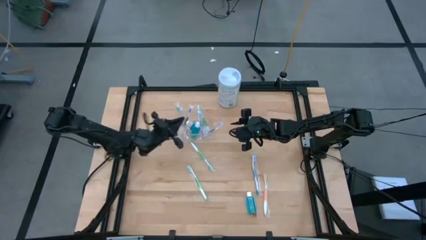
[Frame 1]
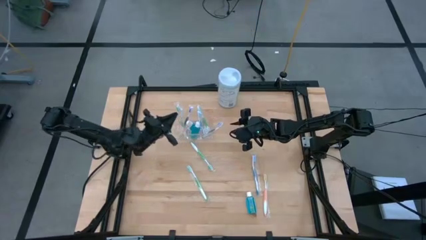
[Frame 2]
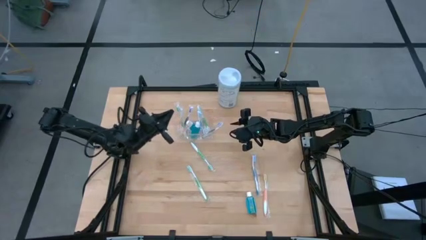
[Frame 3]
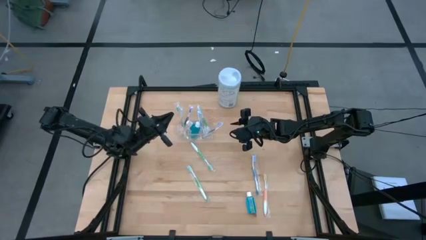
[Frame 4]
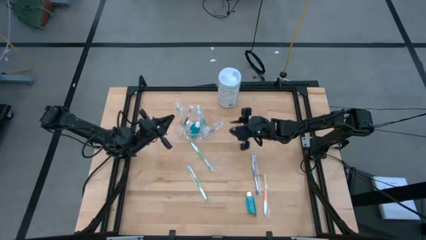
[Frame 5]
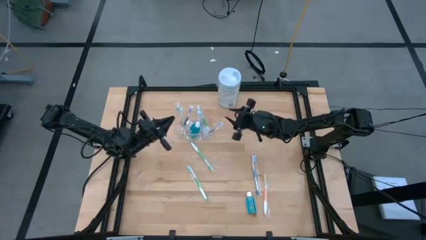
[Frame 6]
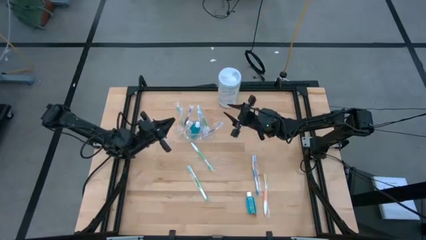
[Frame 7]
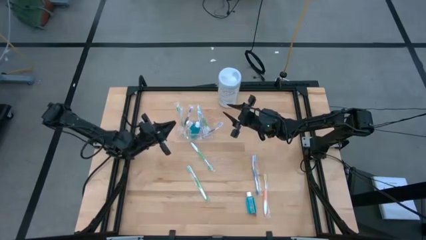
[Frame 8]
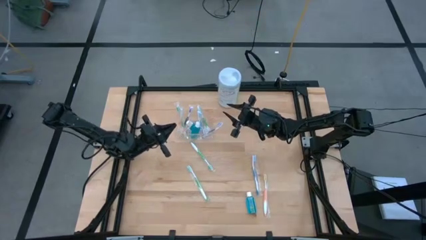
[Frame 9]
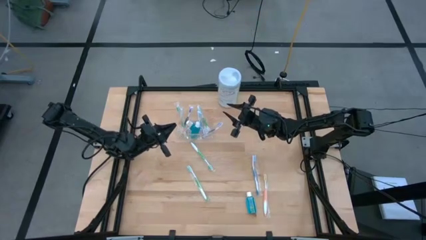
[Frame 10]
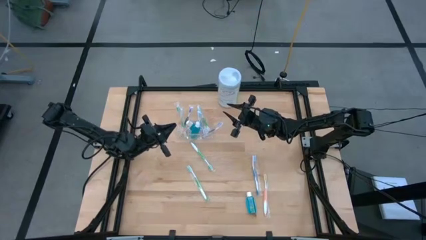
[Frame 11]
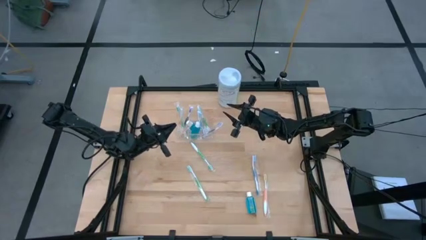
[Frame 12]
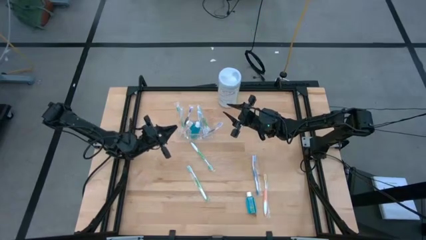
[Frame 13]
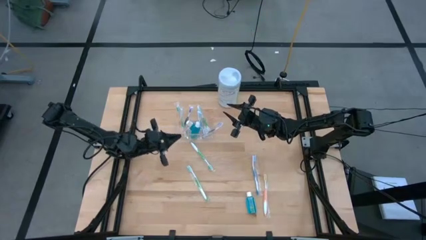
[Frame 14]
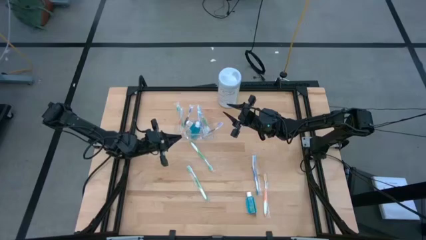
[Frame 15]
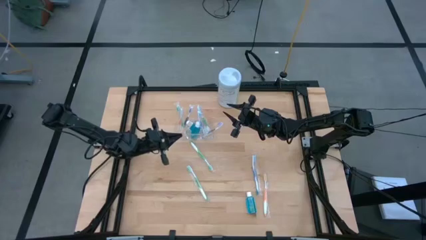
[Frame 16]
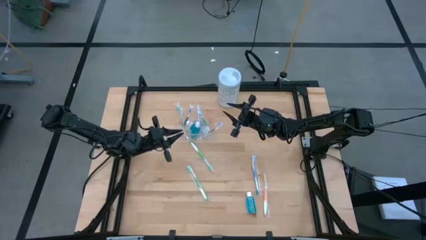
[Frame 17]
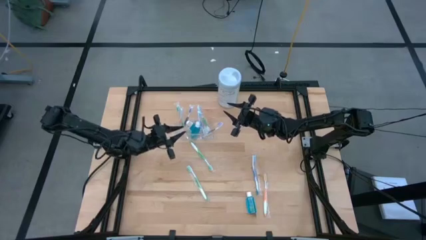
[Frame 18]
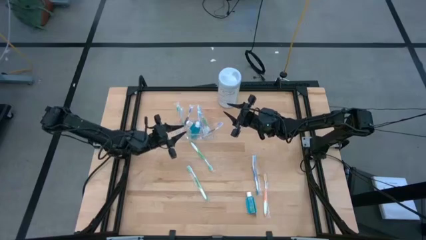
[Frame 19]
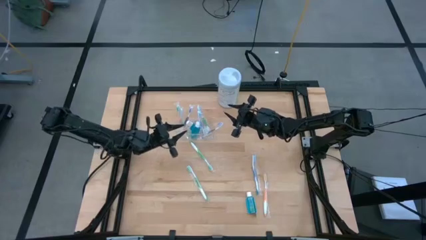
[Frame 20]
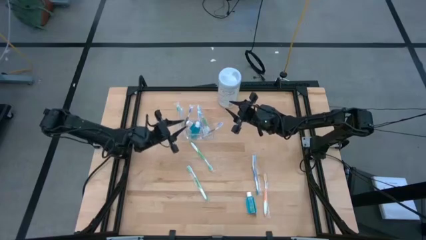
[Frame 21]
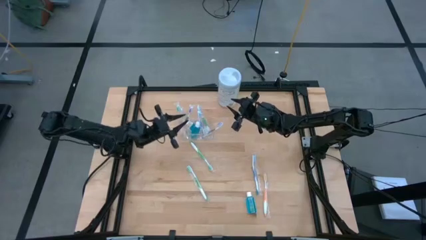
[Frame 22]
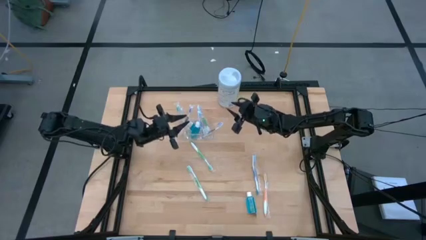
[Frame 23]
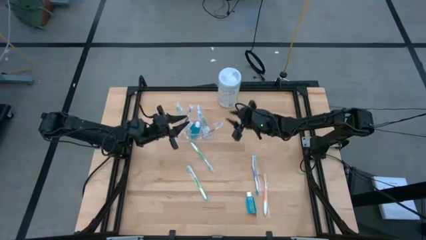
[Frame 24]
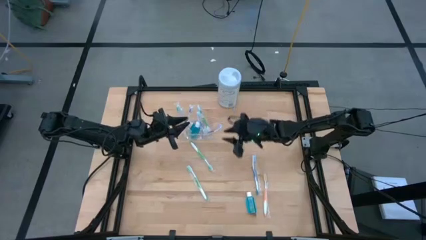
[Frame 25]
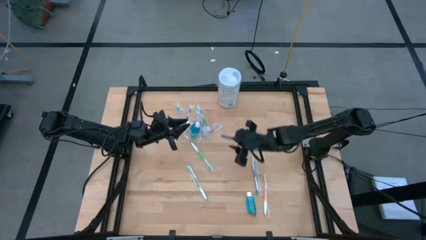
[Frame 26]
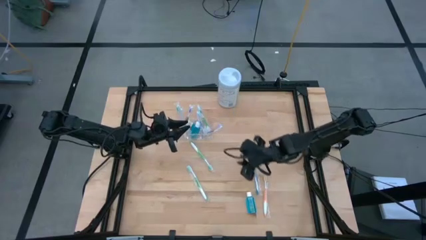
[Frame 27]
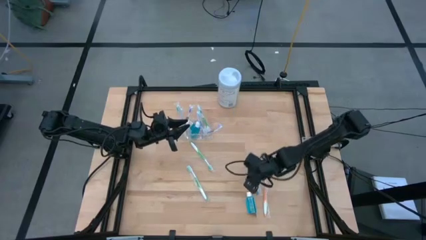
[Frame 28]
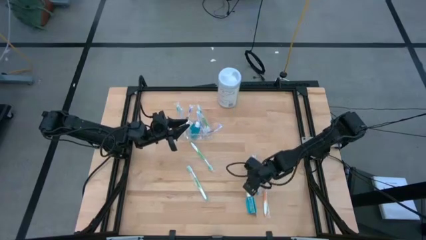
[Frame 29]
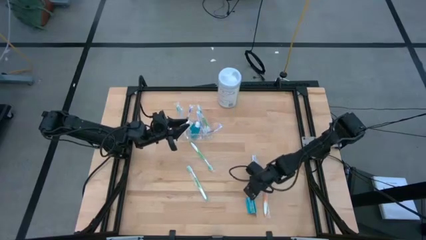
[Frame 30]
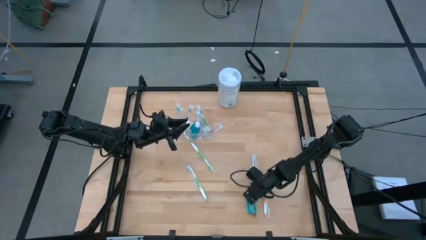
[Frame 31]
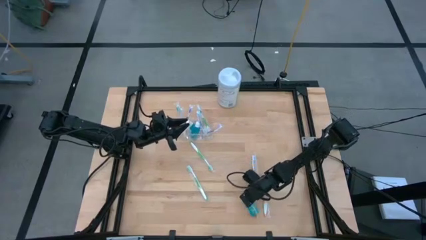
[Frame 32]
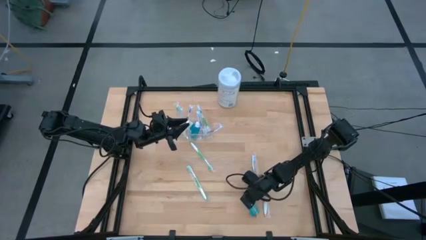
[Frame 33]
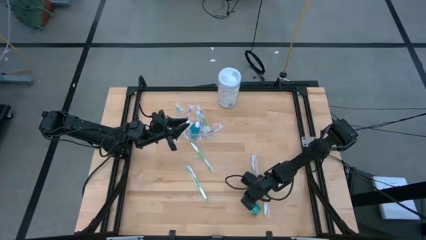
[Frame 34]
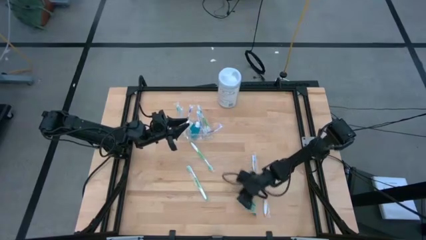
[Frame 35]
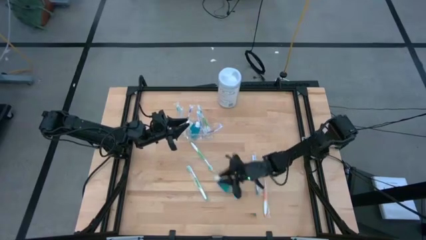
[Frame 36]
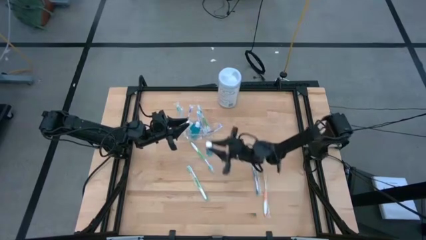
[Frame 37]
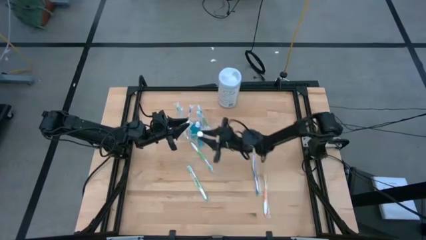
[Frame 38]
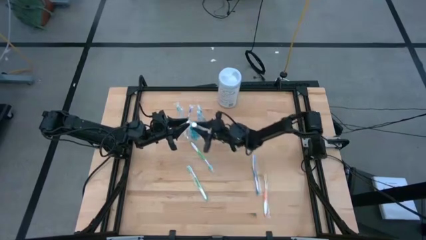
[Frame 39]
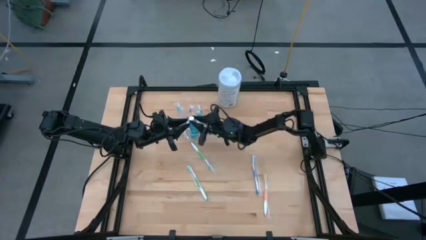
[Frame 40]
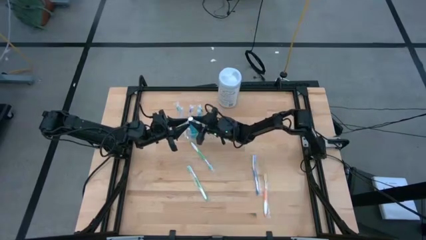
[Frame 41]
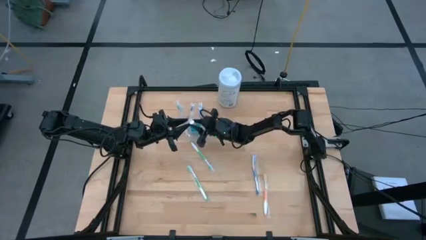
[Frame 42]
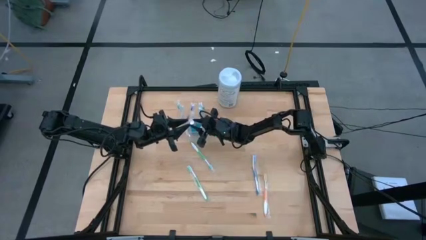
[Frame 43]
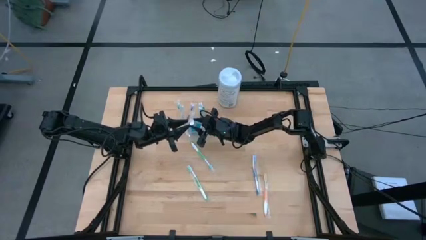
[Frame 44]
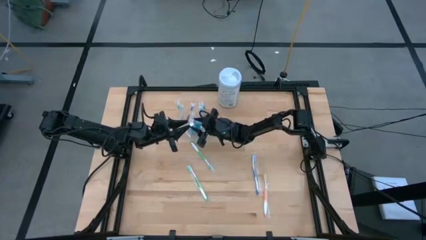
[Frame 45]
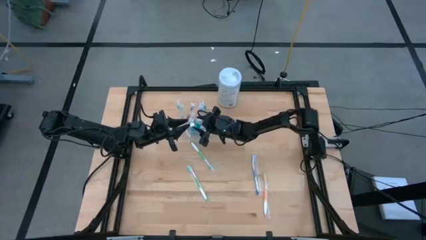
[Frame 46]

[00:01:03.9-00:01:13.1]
Task: Pick & Place toothbrushing station
Put the blue mouthwash into the transparent organizer

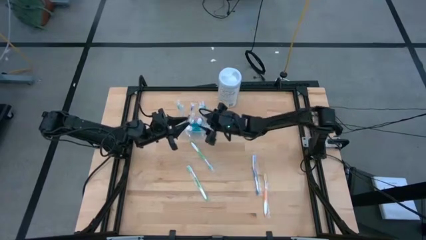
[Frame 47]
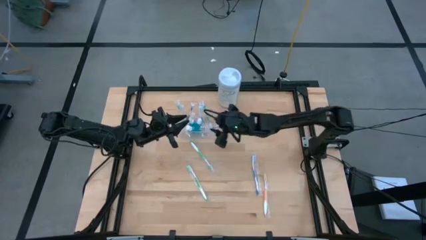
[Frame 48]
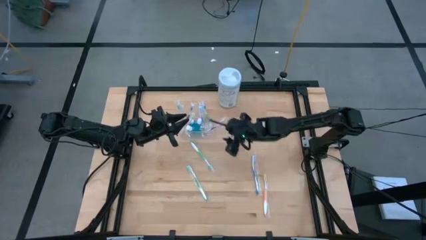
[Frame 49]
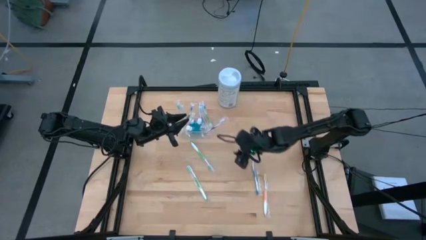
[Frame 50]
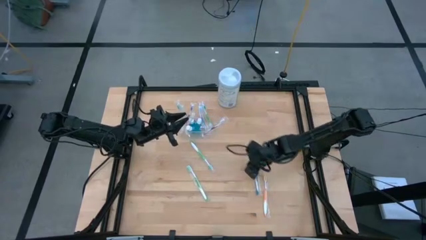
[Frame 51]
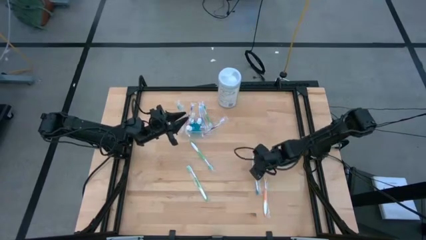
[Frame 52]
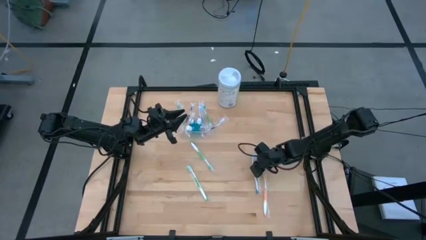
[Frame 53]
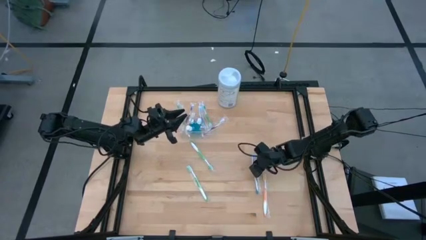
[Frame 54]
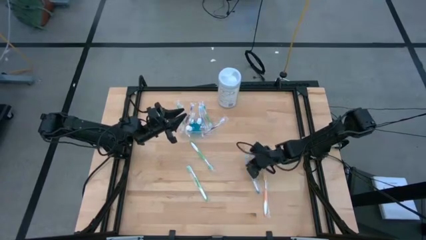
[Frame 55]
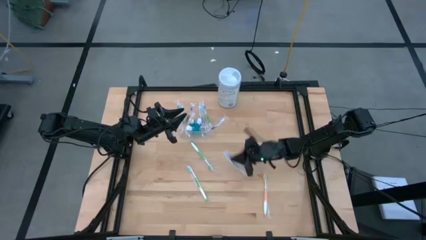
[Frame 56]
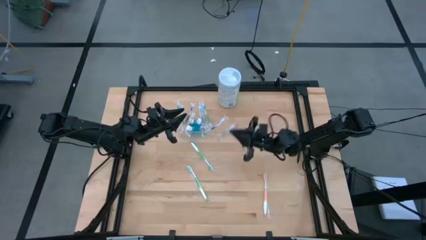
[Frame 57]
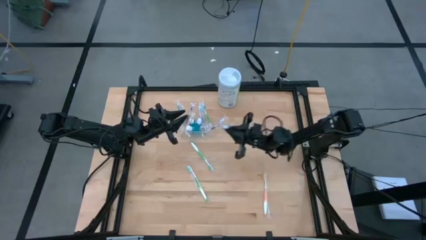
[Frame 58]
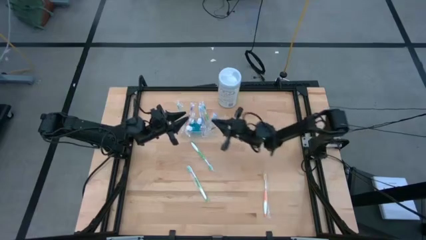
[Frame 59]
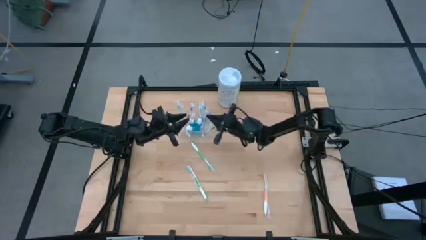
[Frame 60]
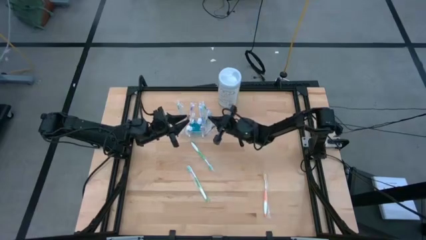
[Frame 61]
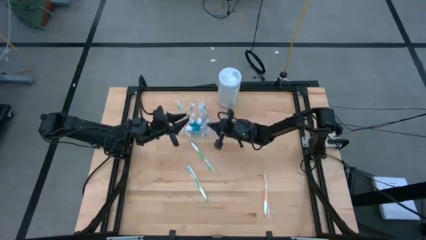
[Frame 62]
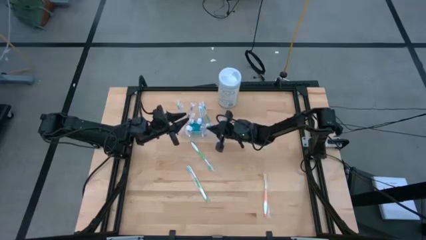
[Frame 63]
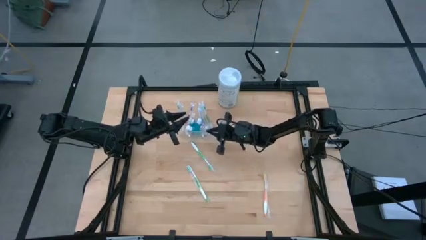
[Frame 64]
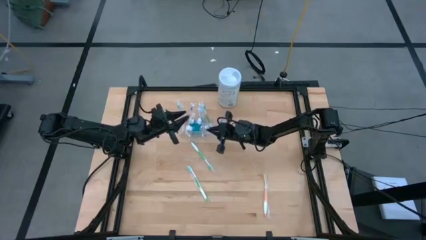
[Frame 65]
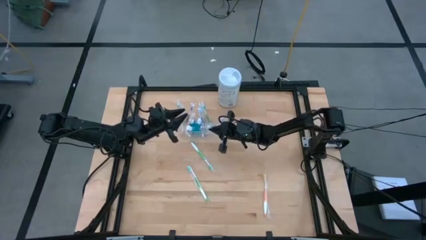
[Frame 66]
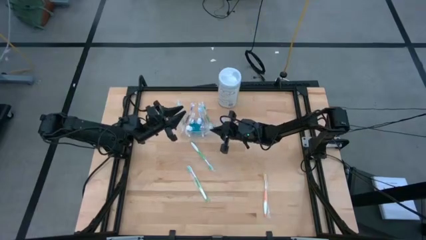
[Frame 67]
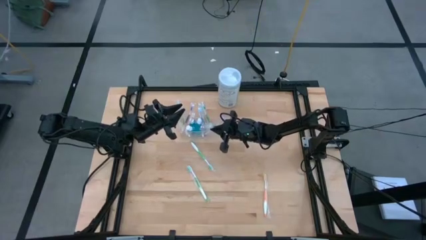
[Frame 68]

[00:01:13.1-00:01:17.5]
Put the blue toothbrush into the transparent organizer

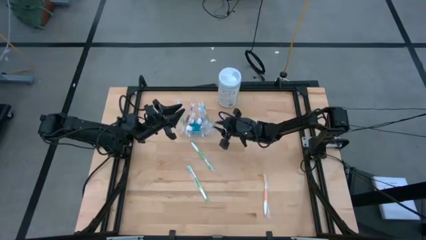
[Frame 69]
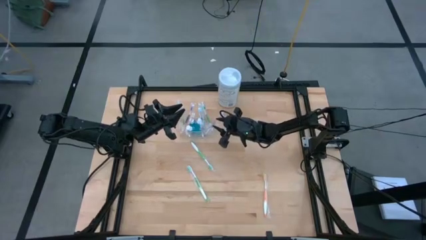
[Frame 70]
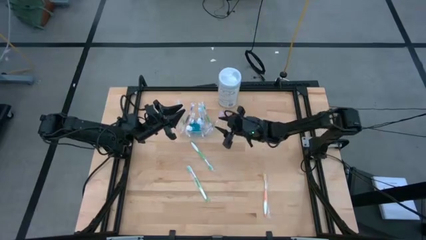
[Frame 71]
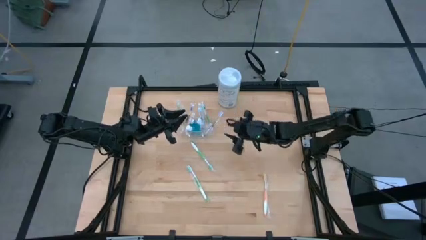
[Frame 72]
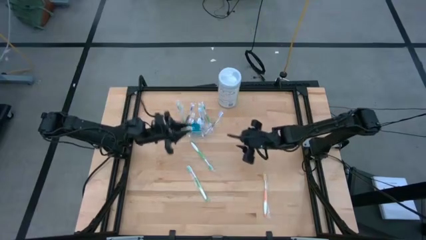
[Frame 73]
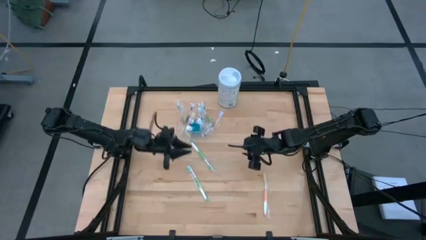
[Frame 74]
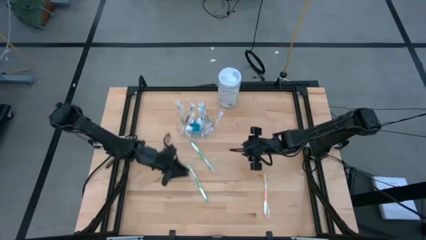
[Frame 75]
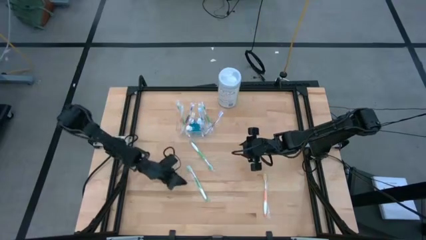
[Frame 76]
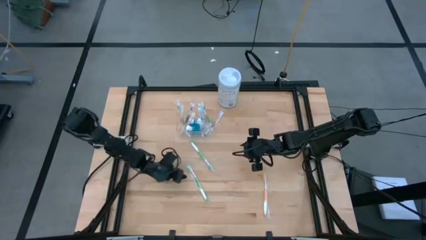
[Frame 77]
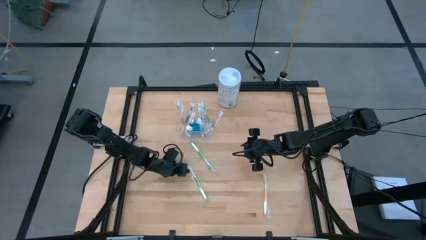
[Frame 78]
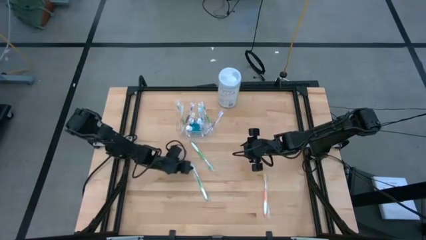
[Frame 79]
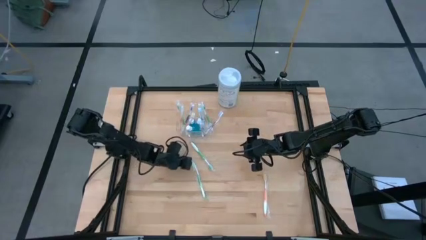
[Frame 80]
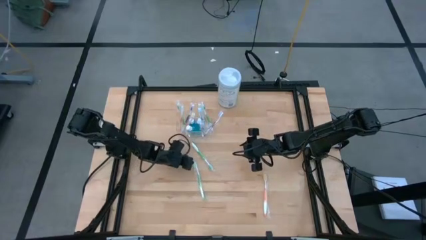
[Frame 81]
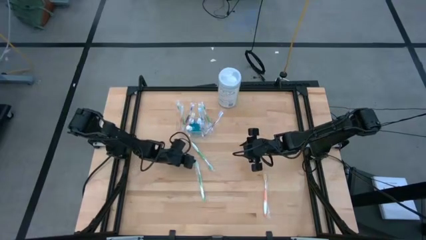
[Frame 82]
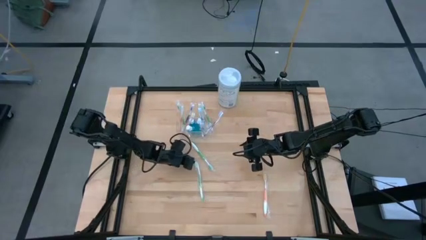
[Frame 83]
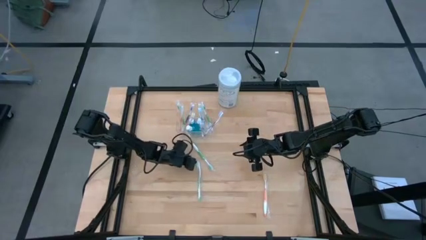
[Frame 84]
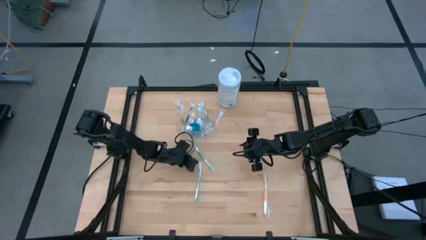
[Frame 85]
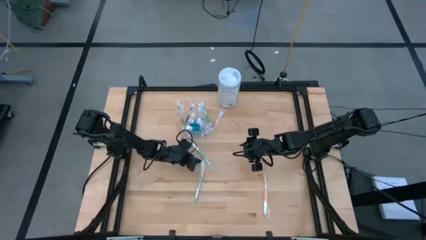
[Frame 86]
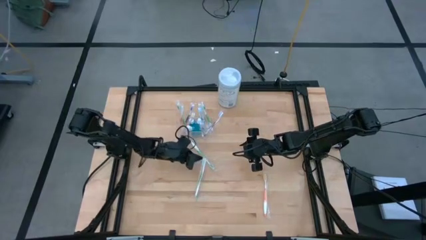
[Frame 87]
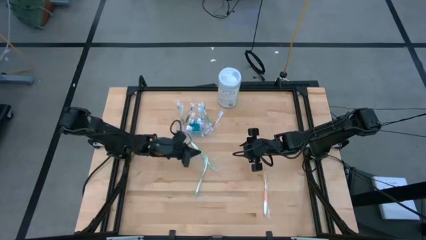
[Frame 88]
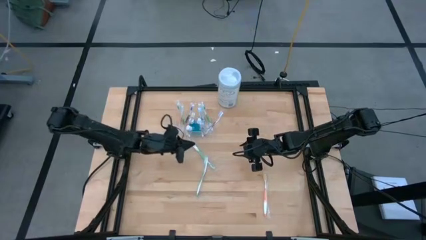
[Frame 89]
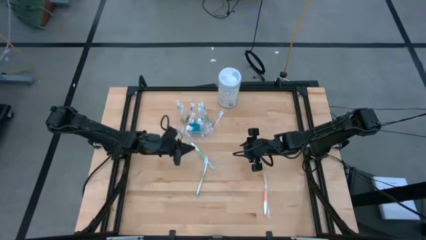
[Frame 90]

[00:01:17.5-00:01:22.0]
Put the green toothbrush into the transparent organizer
